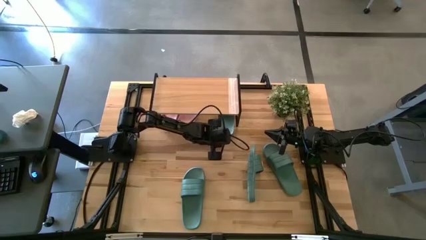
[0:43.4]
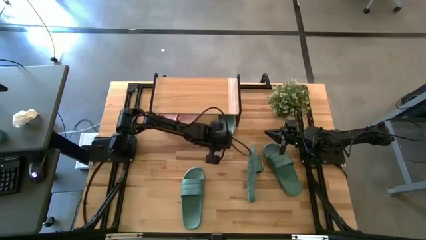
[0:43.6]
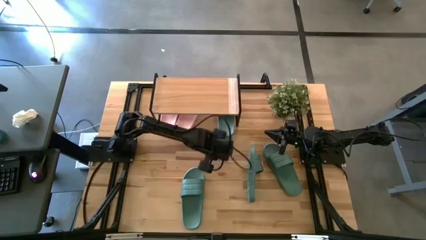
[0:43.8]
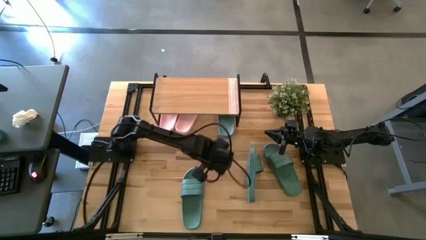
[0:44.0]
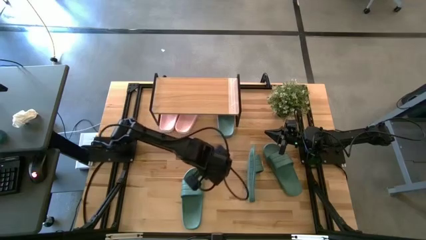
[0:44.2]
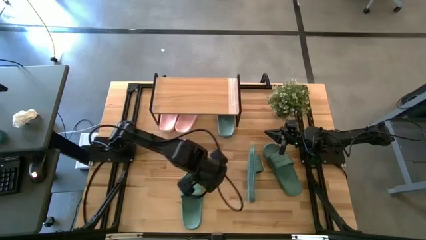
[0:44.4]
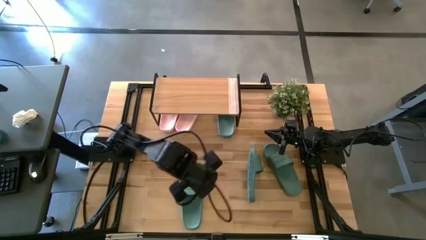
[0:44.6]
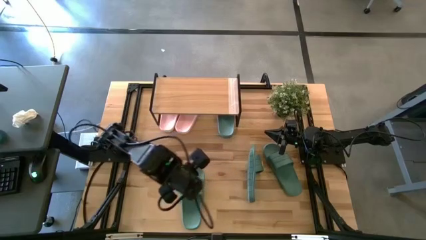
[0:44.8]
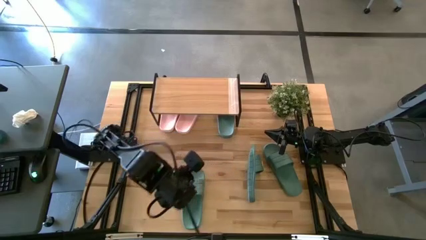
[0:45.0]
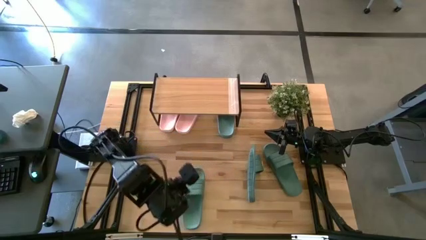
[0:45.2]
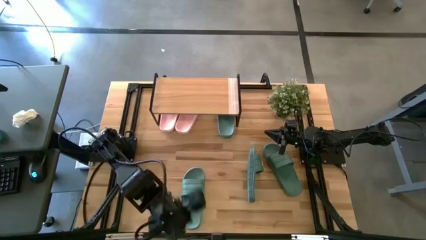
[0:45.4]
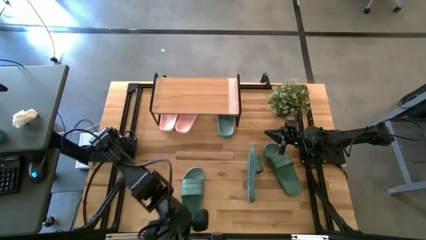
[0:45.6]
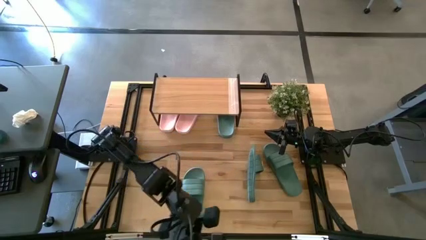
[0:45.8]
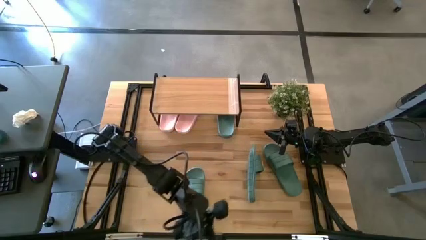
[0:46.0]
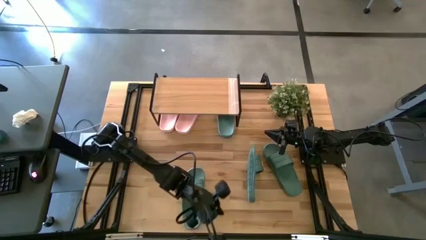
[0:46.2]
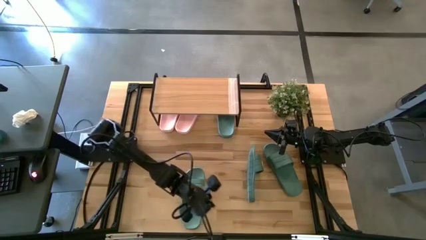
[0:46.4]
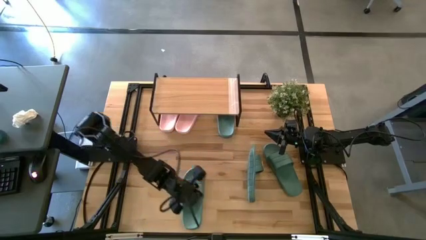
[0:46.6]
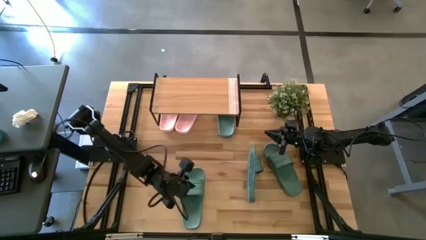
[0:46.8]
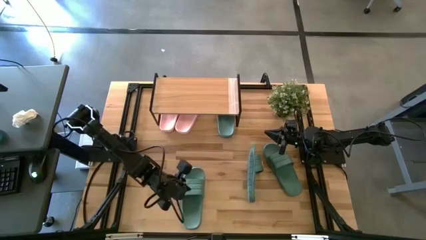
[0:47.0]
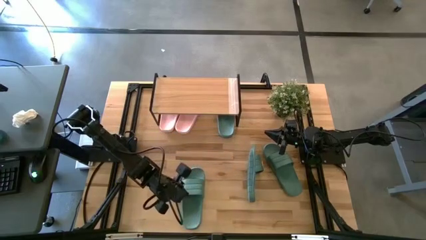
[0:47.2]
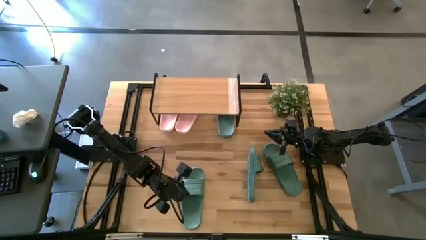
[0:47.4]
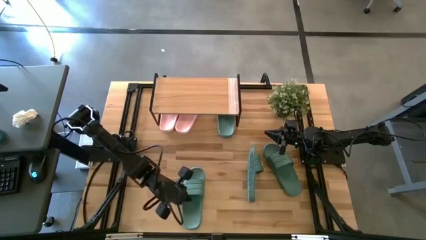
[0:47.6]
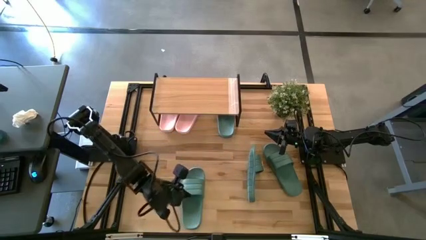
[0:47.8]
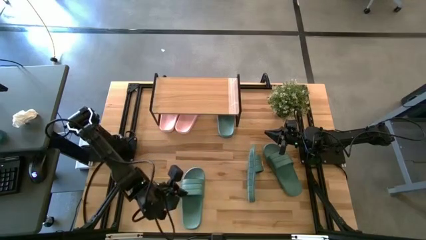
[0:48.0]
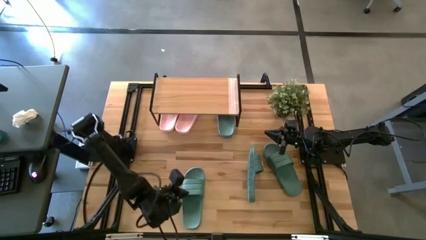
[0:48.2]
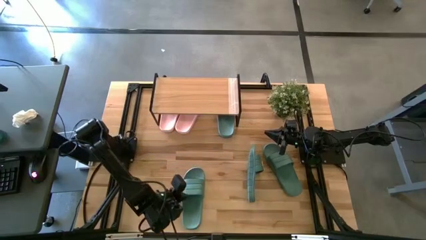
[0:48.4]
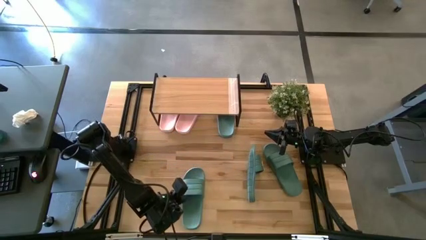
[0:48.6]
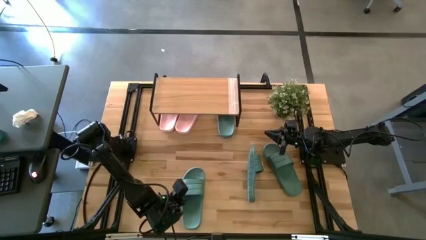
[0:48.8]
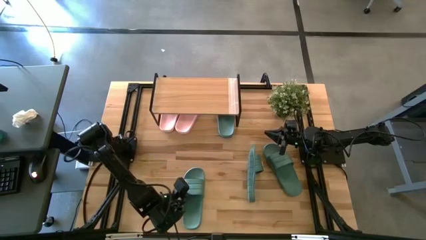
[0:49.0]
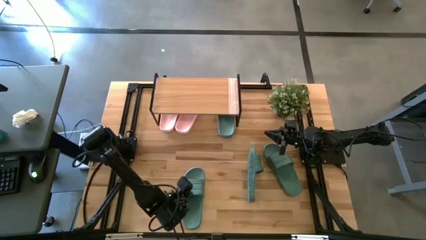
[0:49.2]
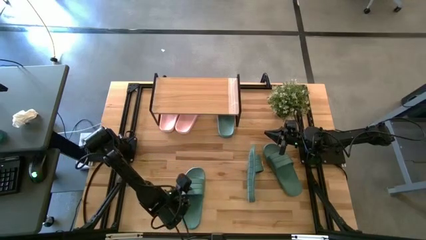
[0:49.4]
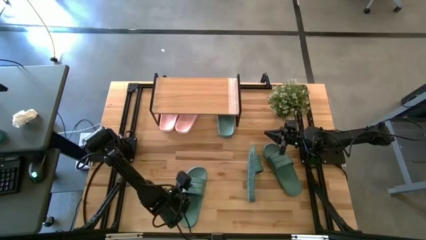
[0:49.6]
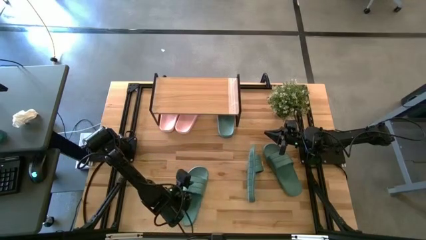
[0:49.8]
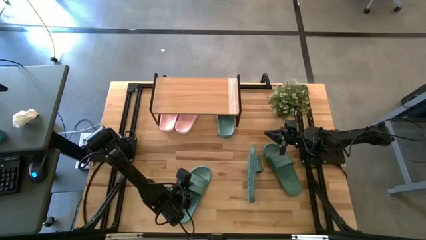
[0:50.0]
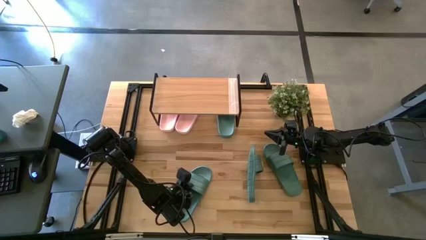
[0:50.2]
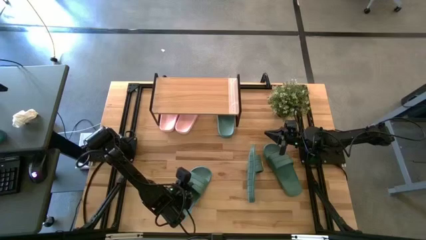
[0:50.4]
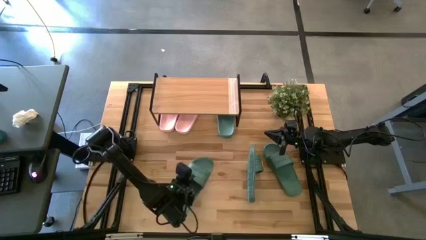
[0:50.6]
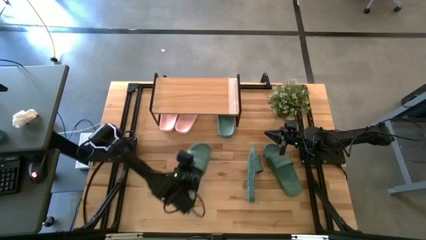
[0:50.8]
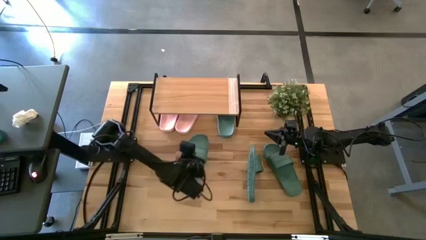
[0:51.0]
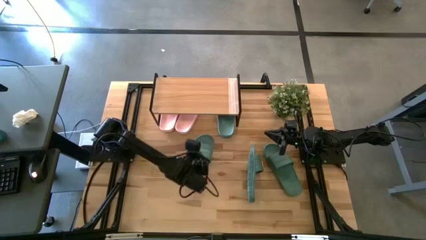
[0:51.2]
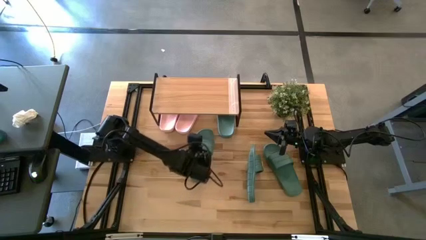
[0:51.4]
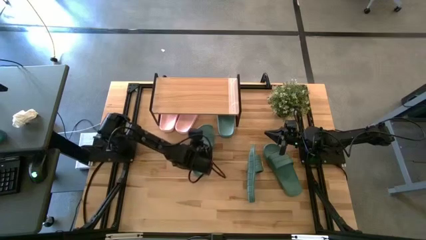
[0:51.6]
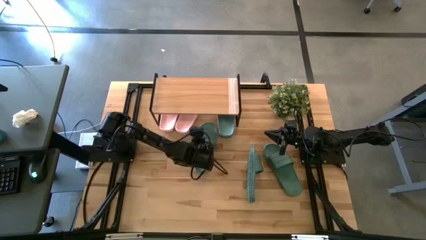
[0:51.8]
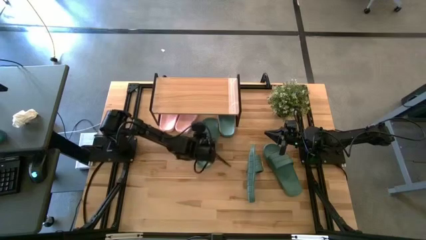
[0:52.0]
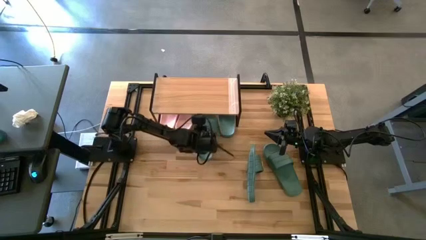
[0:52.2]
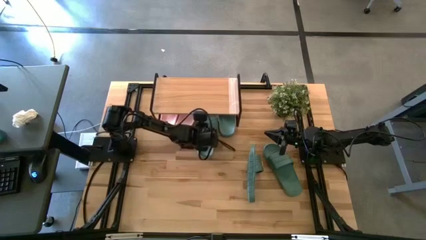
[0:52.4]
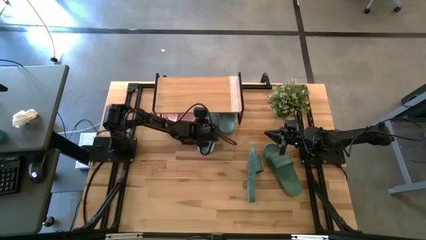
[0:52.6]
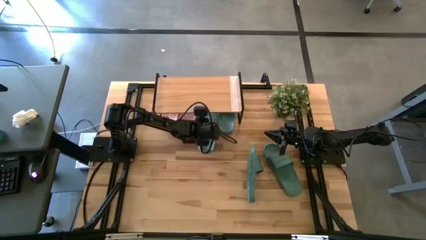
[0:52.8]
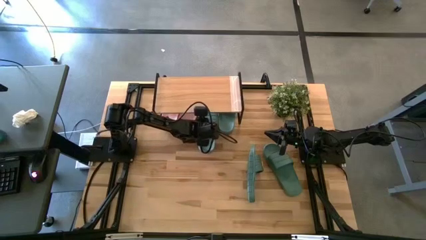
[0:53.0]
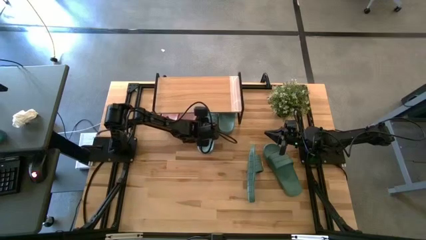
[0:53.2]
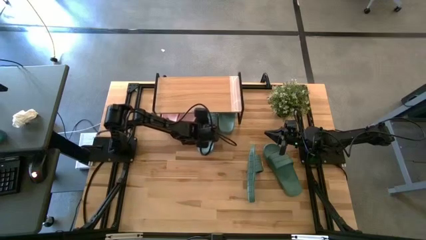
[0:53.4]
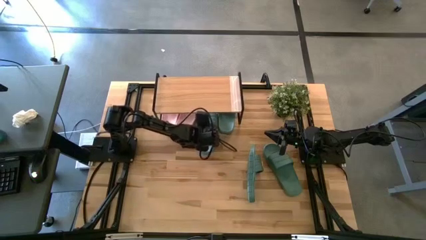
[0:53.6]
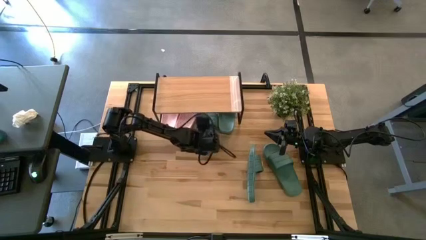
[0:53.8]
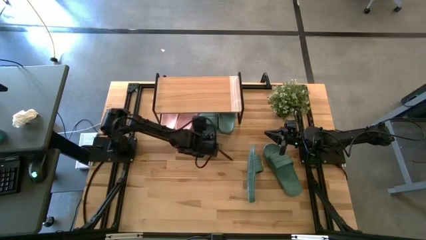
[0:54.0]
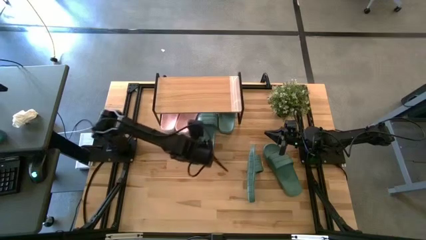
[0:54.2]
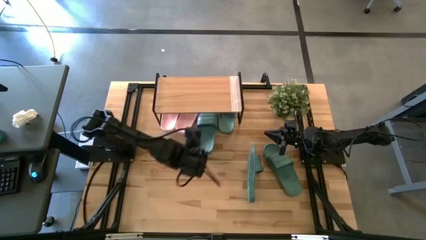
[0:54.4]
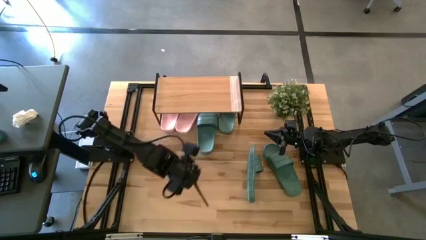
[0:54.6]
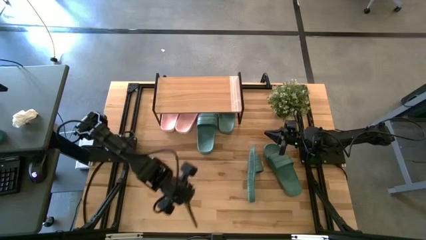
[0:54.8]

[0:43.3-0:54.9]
Task: Pick and place slides into the shelf
Put the left blue slipper on the bottom shelf
